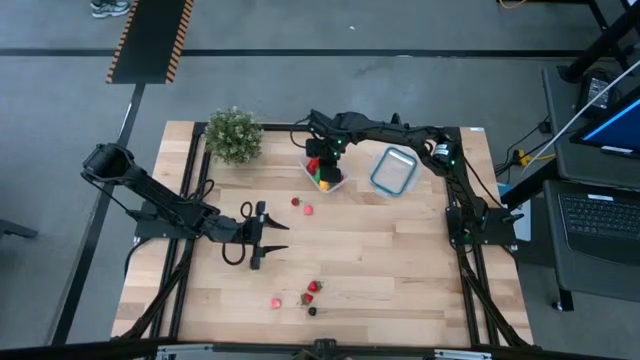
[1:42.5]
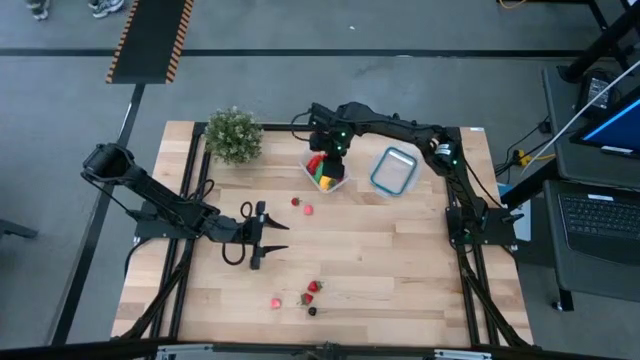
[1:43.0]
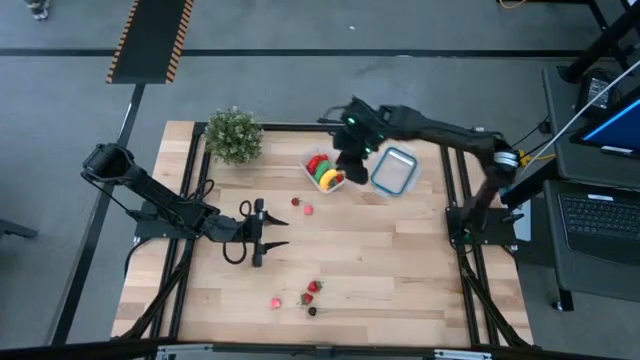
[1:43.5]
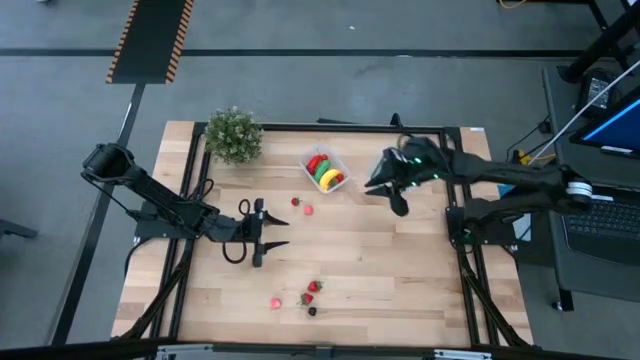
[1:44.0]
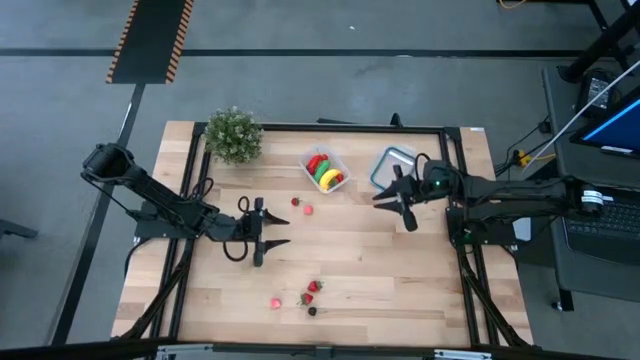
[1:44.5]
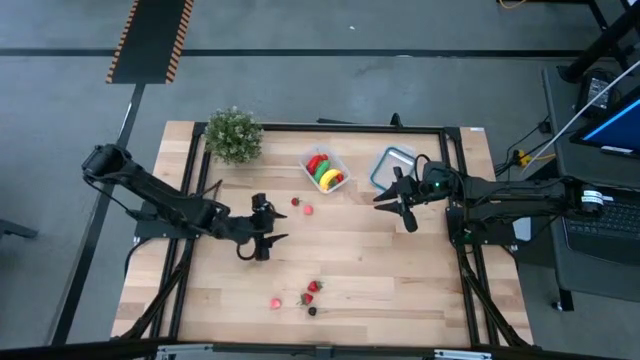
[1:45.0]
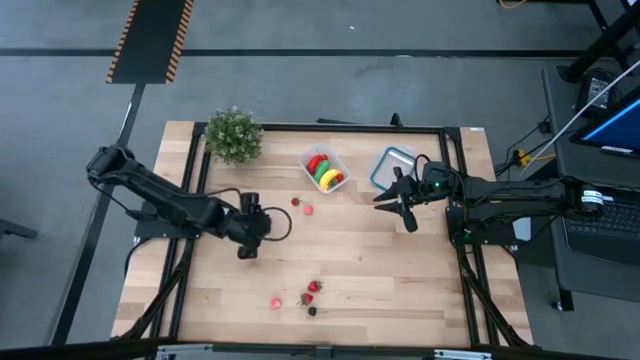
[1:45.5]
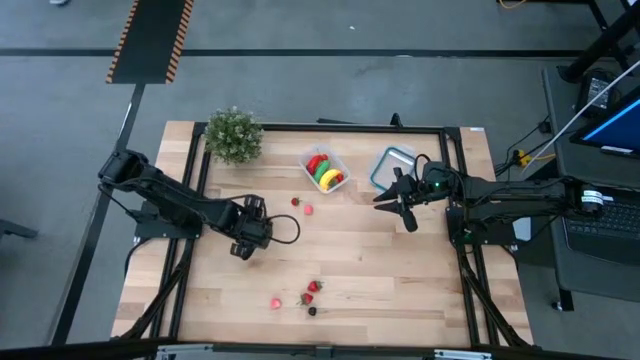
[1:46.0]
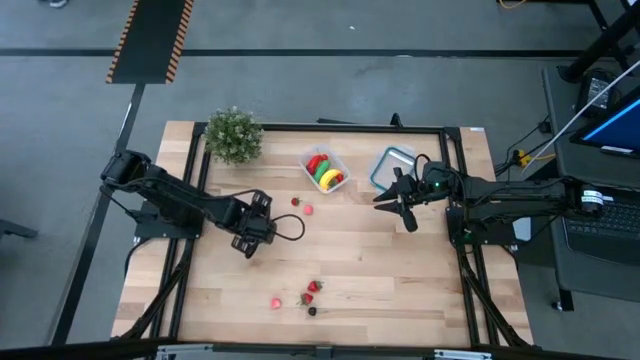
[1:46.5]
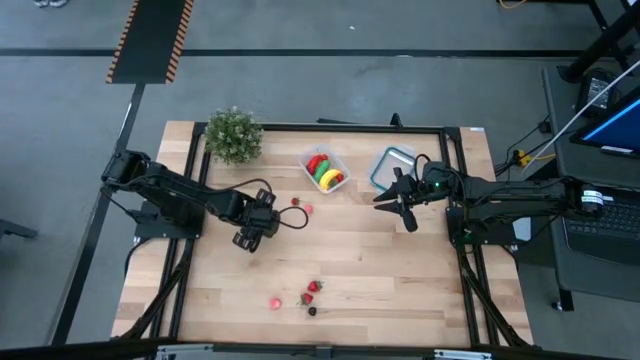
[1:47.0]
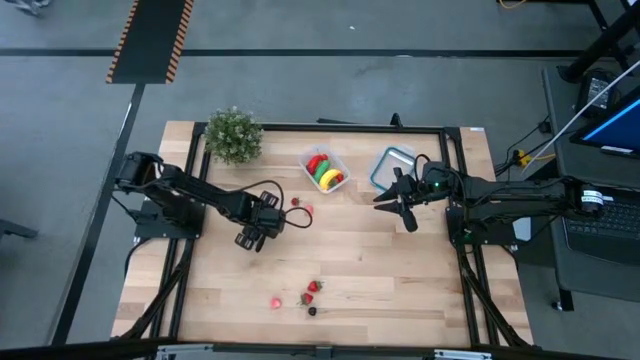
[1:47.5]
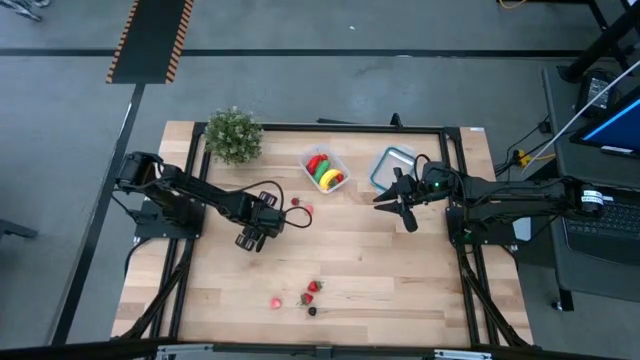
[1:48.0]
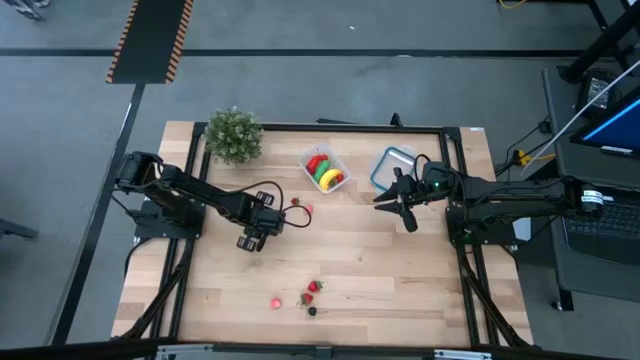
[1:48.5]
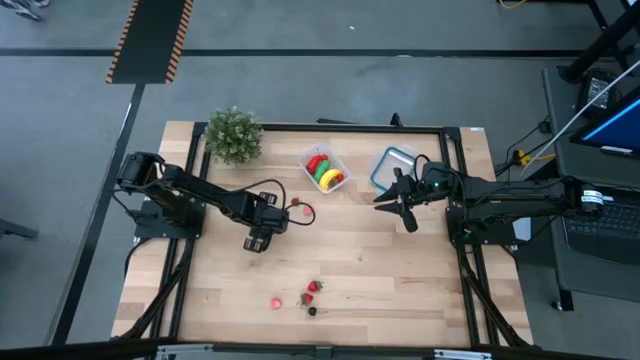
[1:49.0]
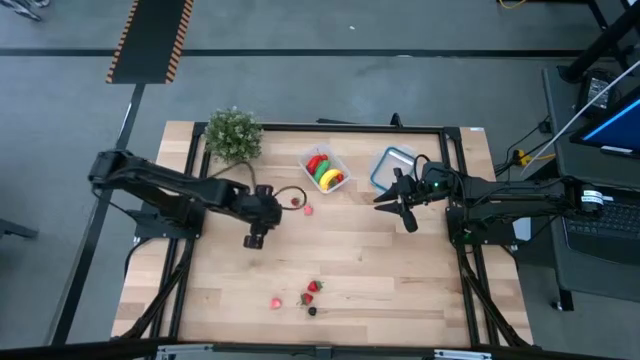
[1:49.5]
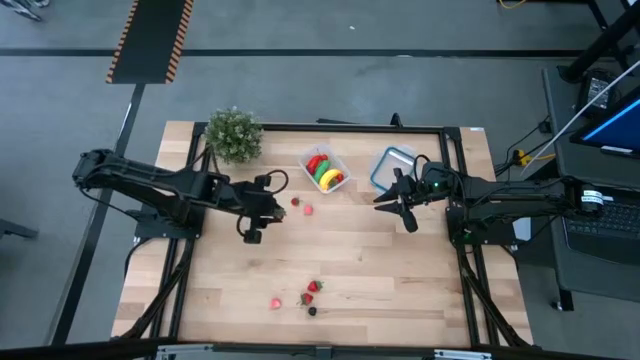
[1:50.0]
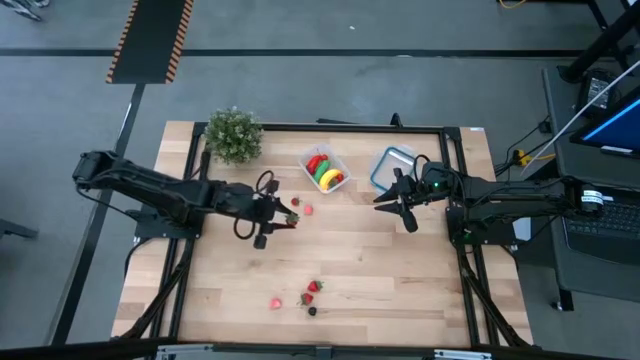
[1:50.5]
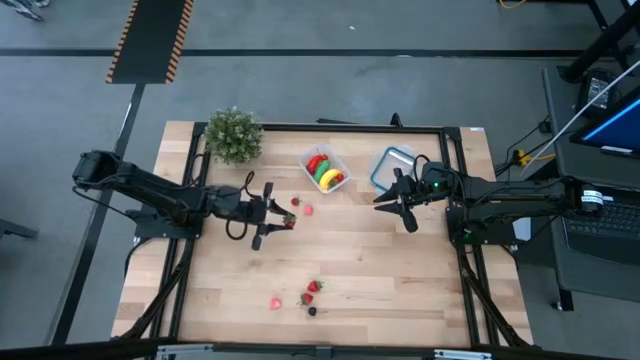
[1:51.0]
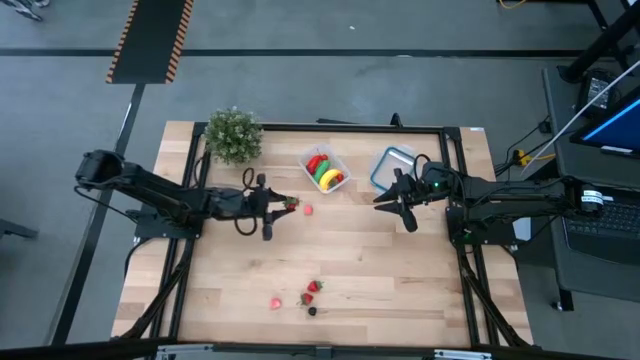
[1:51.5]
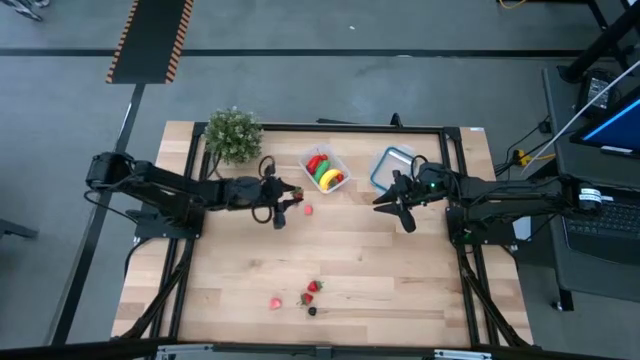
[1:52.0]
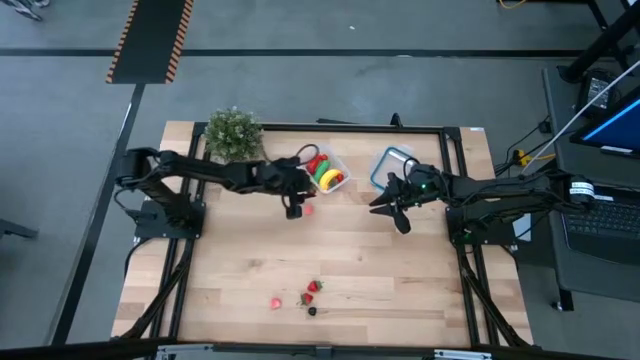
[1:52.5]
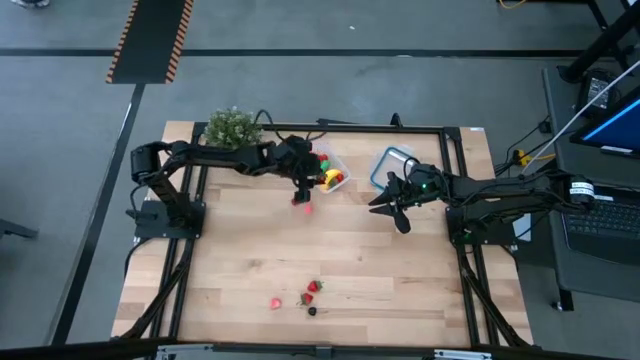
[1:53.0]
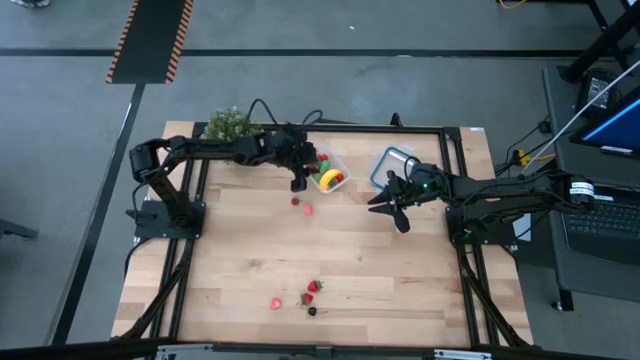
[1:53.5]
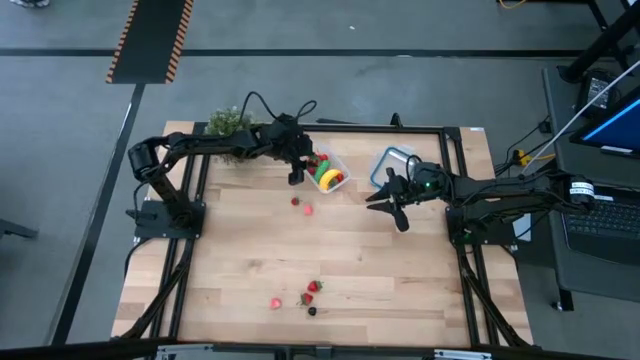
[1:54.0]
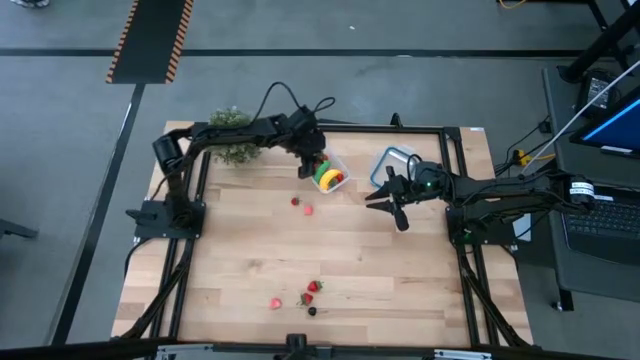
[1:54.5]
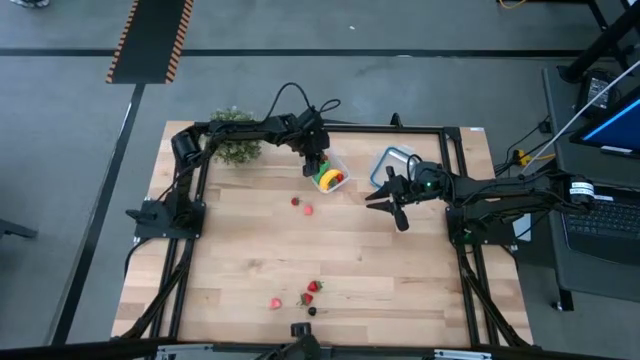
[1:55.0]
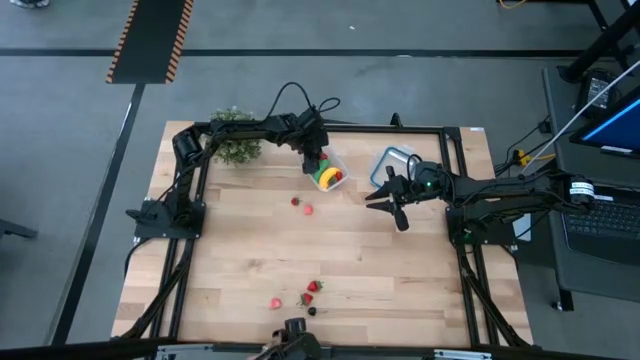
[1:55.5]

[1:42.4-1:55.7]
Task: Pick and placing Produce into tupperware
Put the red strawberry into the transparent container

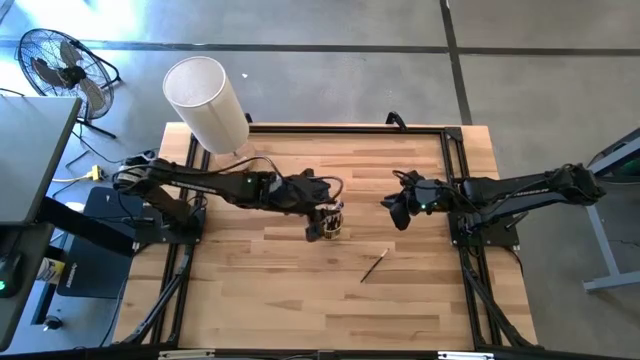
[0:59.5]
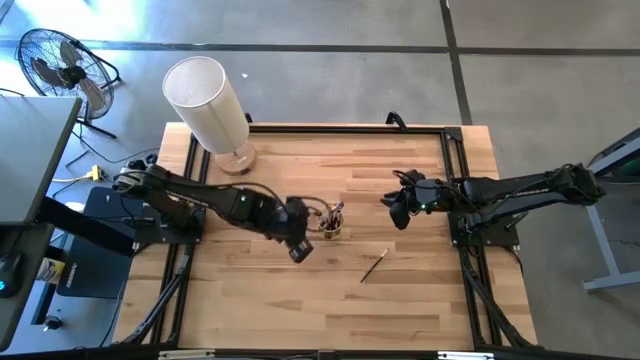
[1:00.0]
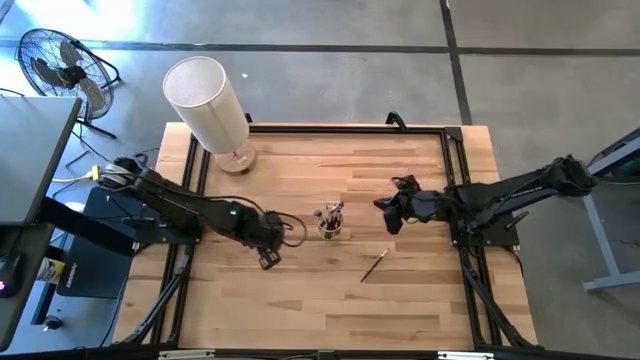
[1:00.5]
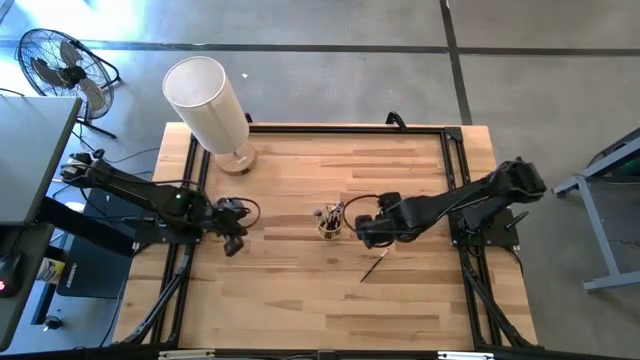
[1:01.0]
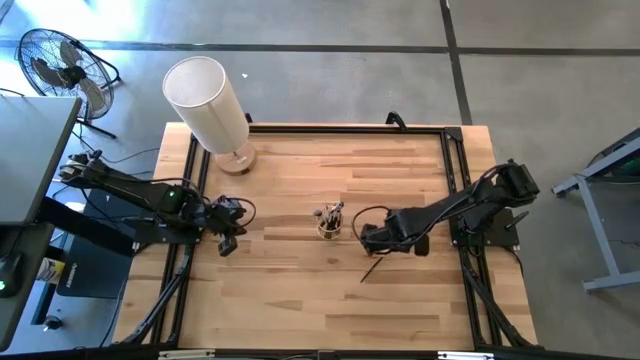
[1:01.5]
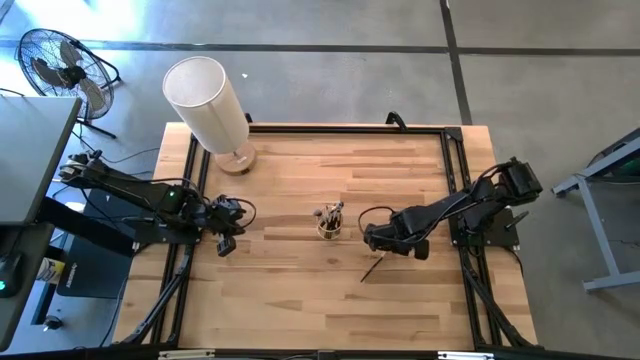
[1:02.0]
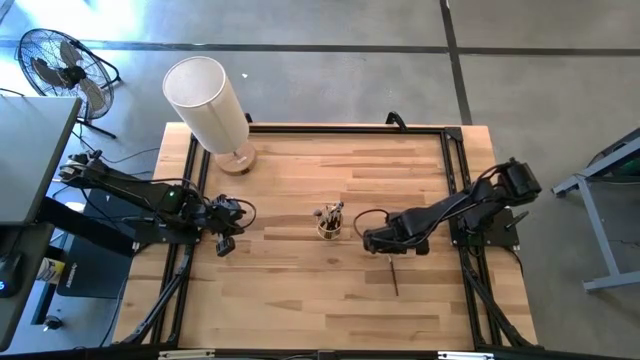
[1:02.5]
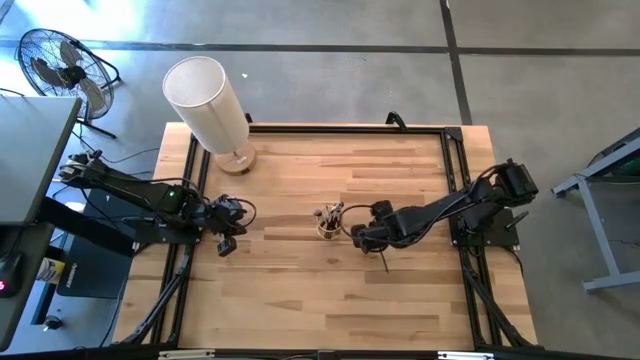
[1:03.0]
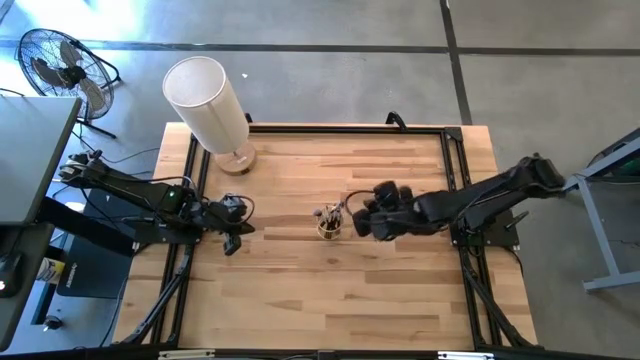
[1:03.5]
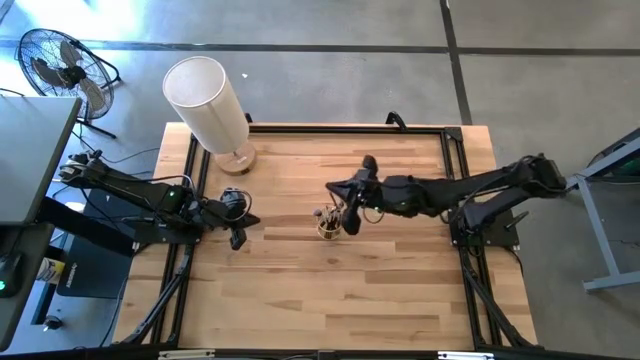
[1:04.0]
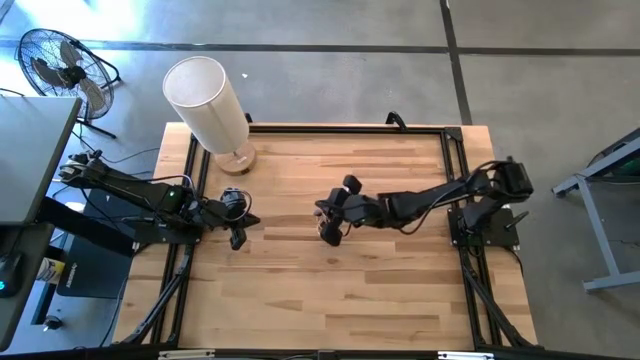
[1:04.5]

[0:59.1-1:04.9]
Task: Put items in baskets/containers
Put the eyeshadow brush into the wire organizer

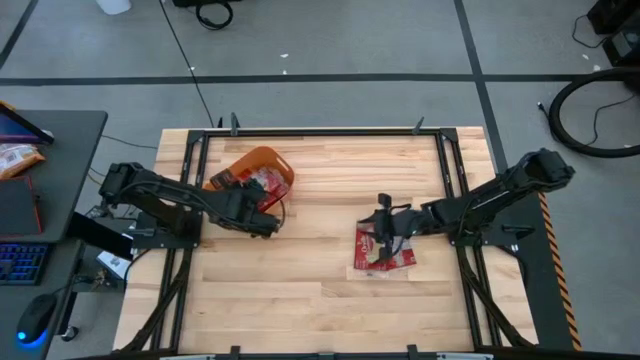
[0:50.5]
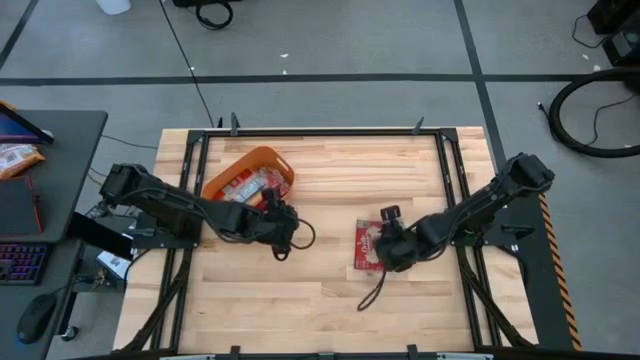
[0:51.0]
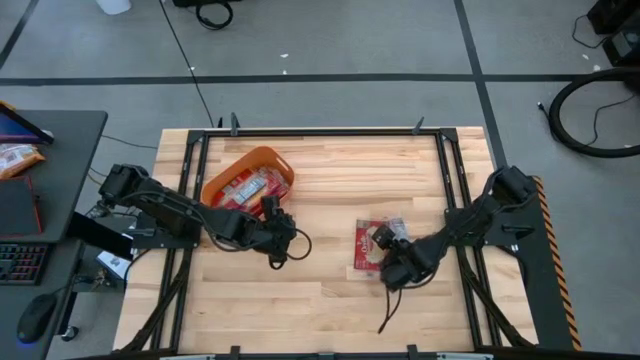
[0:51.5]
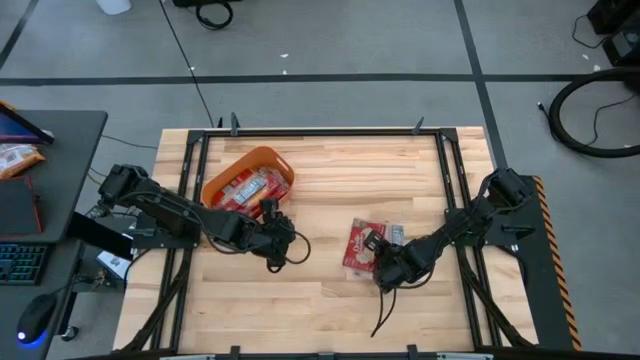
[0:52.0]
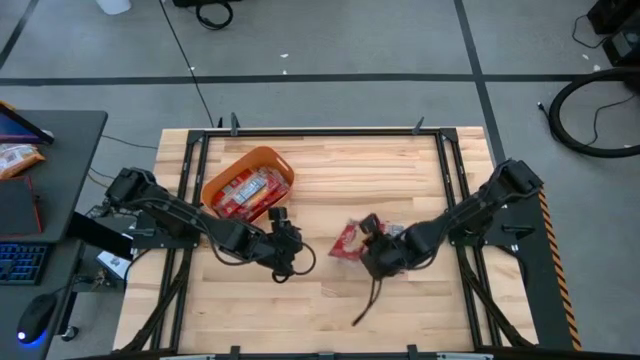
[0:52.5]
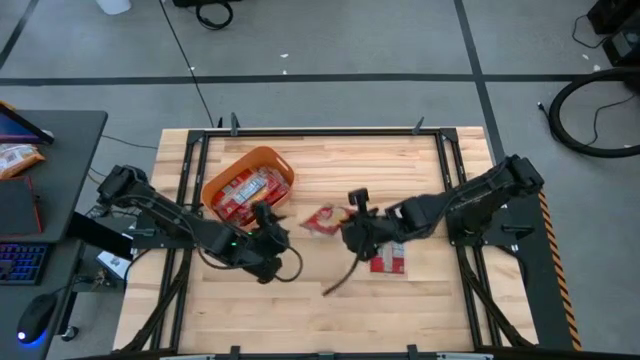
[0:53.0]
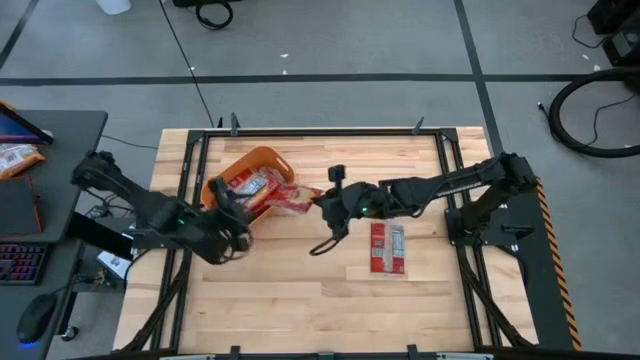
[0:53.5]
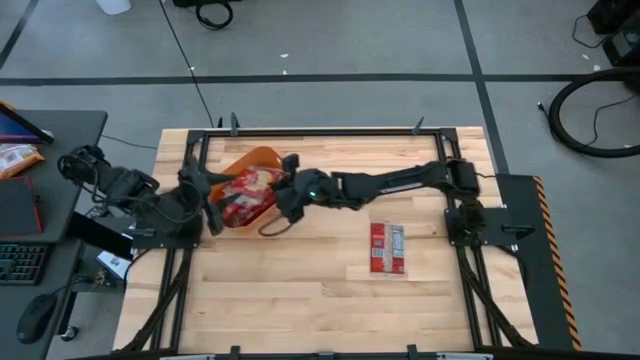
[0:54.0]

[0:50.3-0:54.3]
Task: Sort popcorn bags into baskets
Put the red popcorn bag into the orange bin
